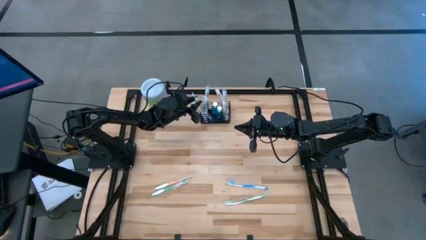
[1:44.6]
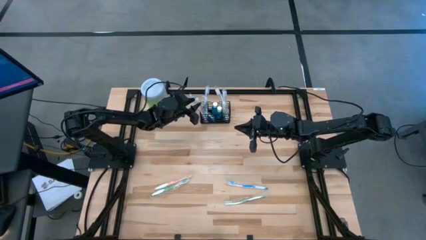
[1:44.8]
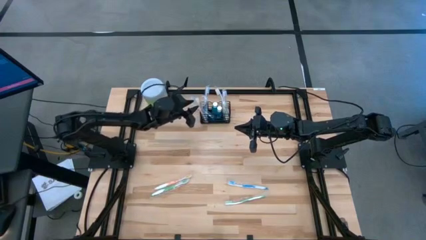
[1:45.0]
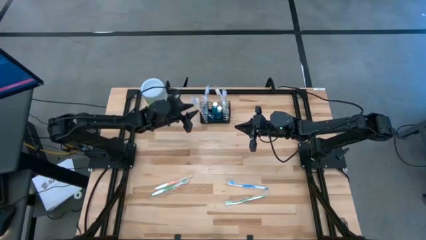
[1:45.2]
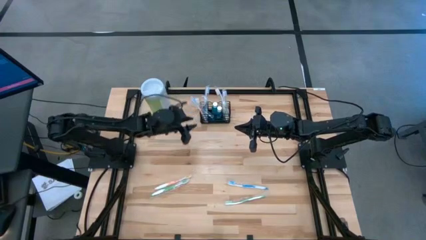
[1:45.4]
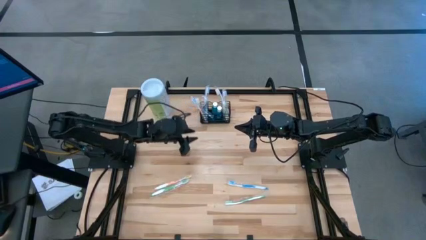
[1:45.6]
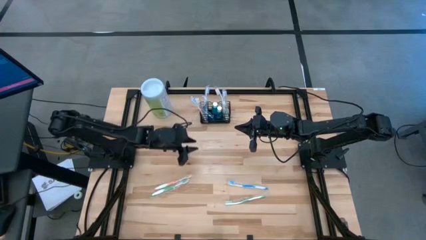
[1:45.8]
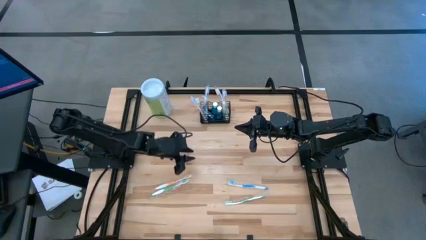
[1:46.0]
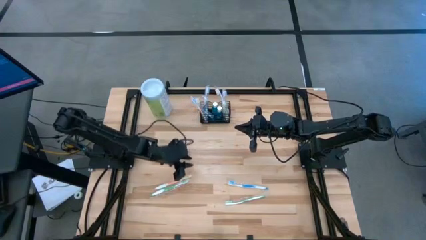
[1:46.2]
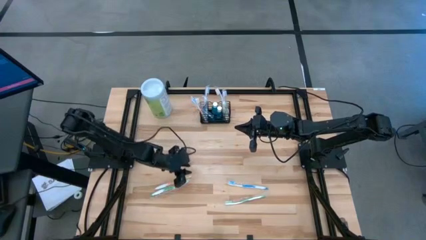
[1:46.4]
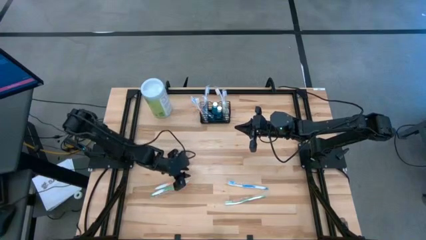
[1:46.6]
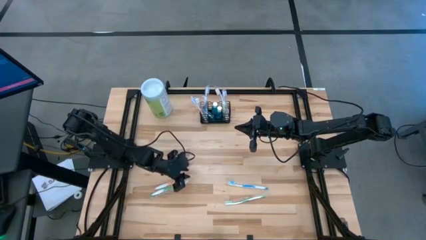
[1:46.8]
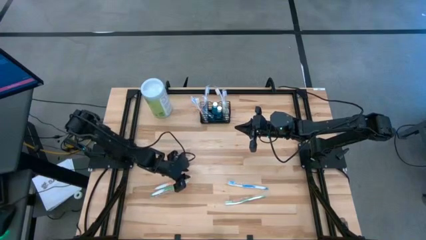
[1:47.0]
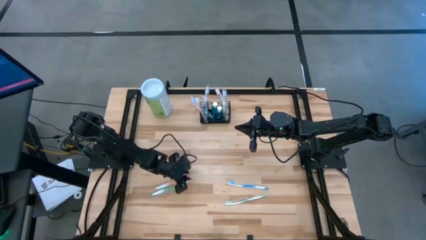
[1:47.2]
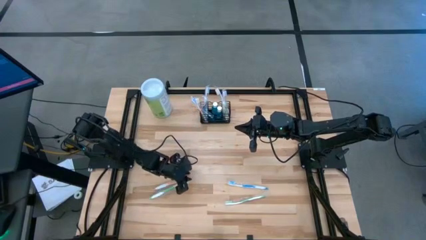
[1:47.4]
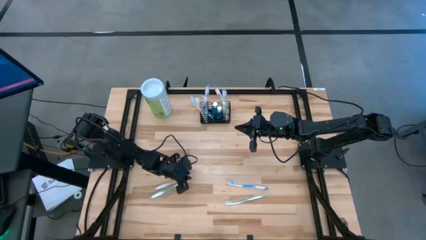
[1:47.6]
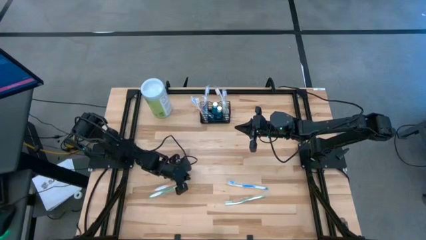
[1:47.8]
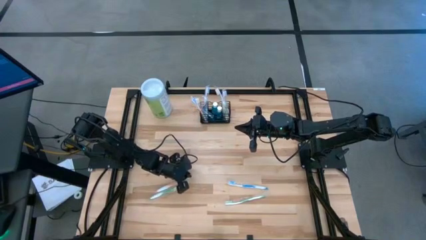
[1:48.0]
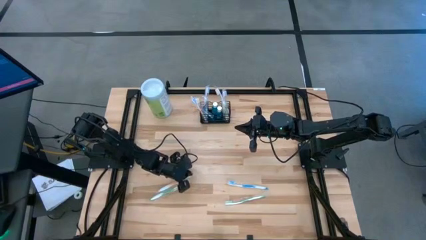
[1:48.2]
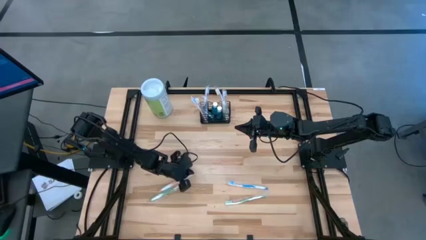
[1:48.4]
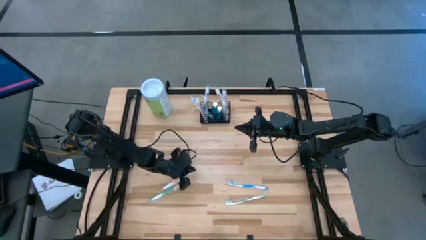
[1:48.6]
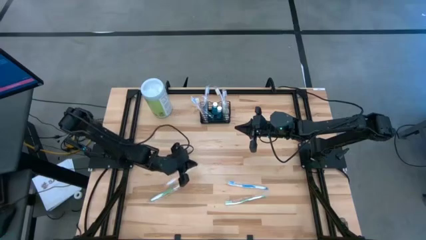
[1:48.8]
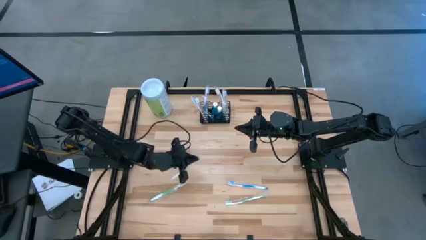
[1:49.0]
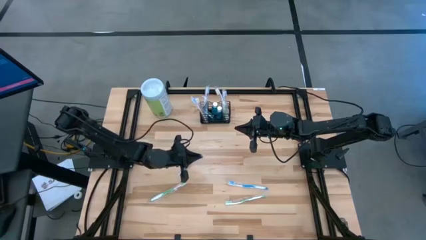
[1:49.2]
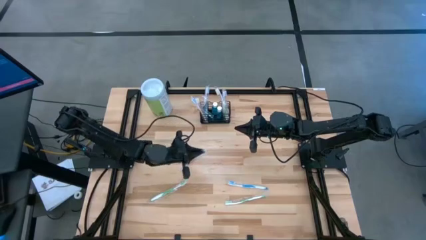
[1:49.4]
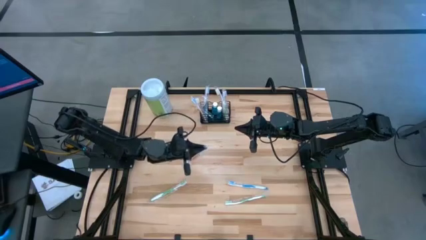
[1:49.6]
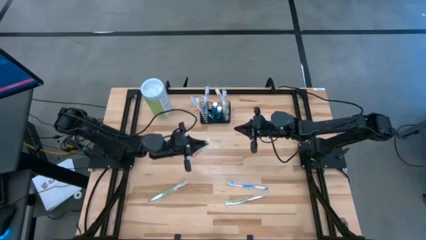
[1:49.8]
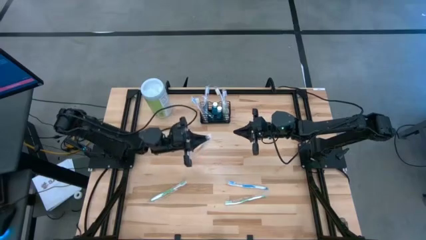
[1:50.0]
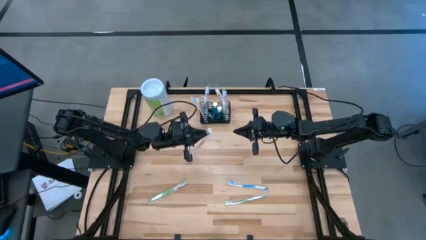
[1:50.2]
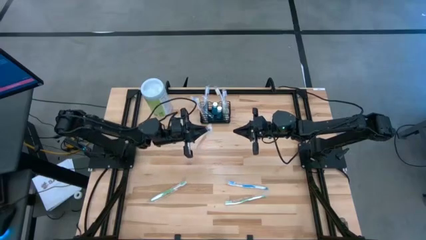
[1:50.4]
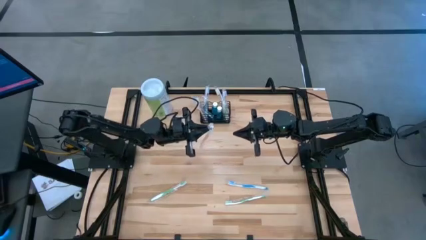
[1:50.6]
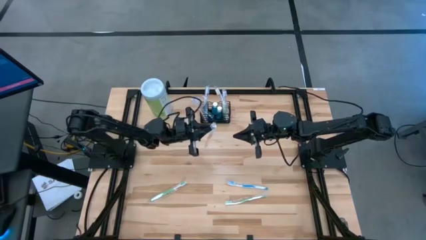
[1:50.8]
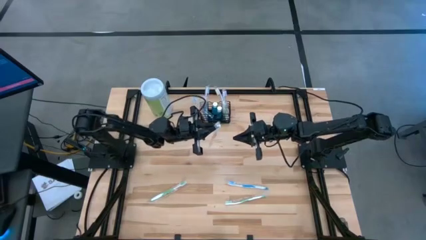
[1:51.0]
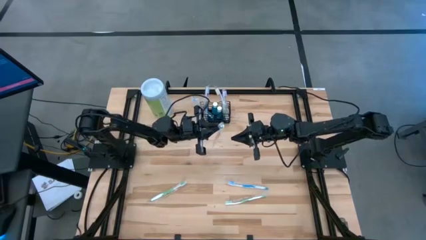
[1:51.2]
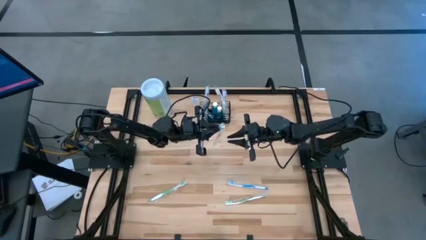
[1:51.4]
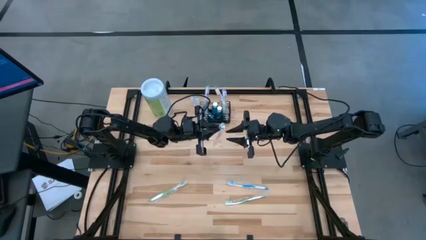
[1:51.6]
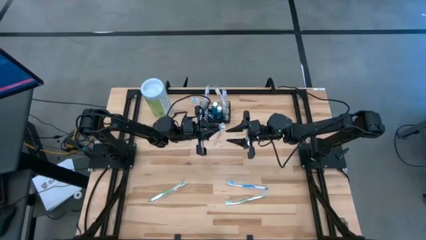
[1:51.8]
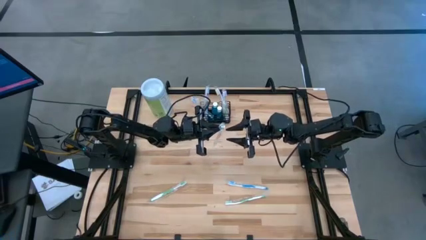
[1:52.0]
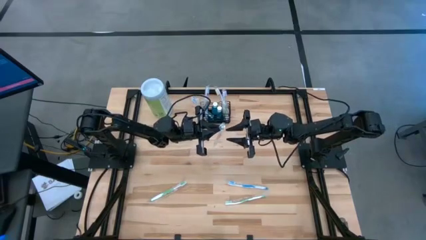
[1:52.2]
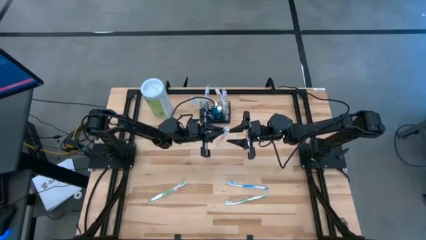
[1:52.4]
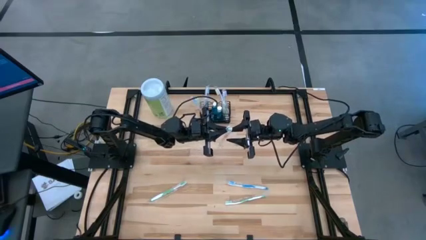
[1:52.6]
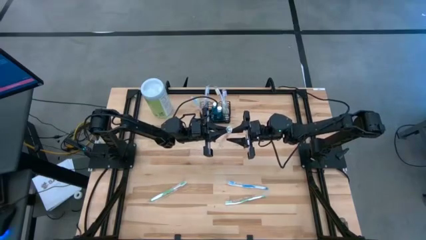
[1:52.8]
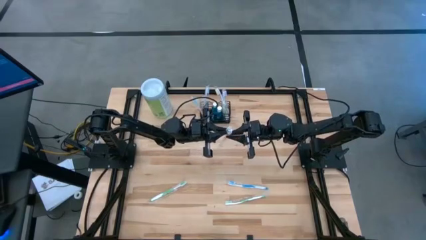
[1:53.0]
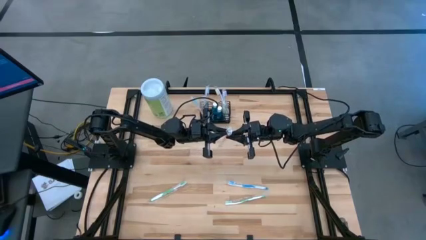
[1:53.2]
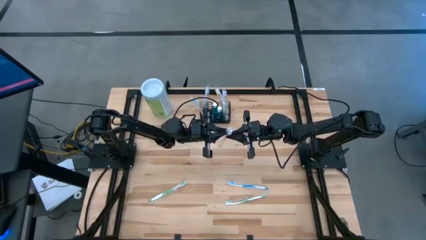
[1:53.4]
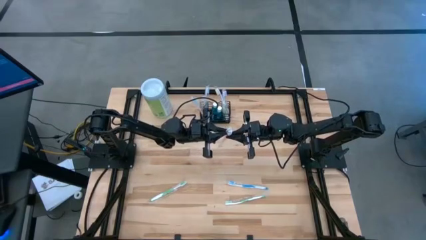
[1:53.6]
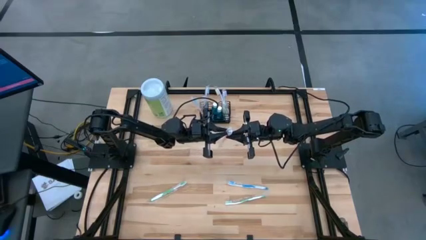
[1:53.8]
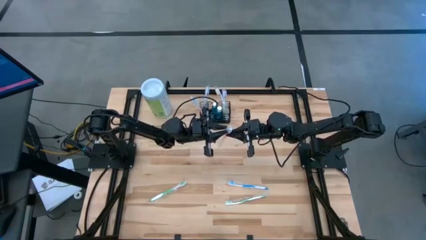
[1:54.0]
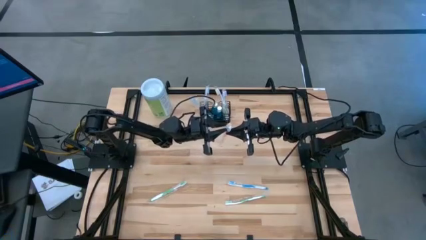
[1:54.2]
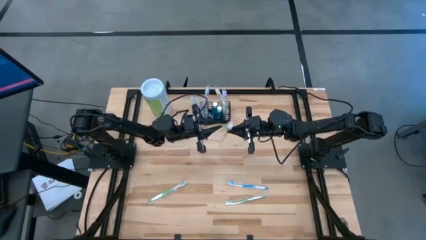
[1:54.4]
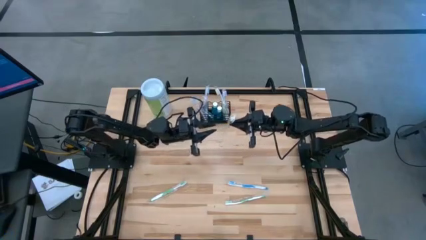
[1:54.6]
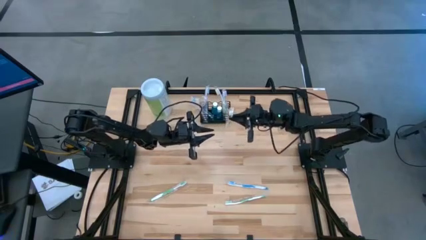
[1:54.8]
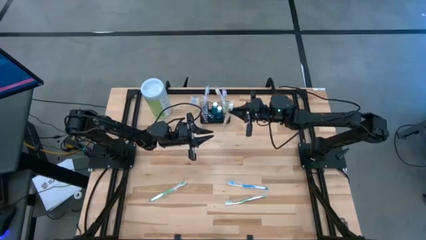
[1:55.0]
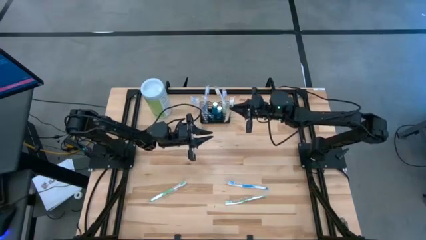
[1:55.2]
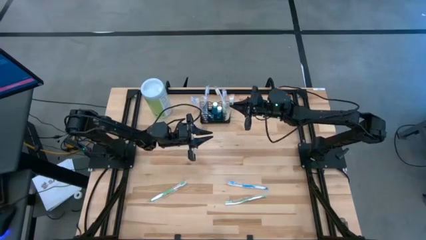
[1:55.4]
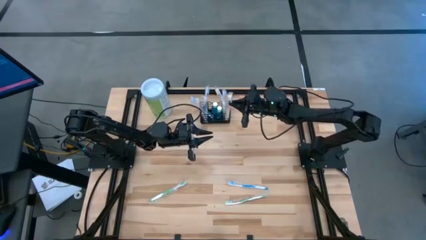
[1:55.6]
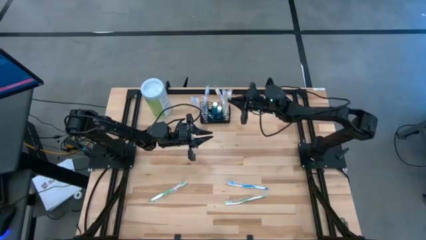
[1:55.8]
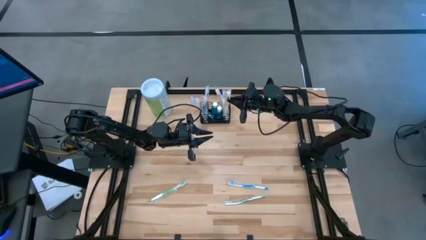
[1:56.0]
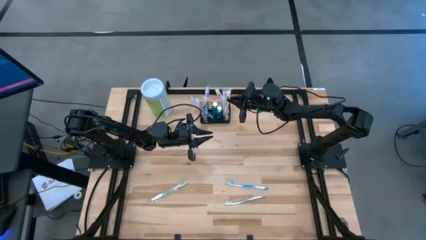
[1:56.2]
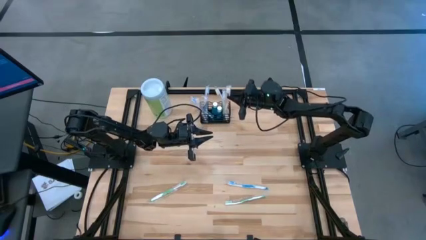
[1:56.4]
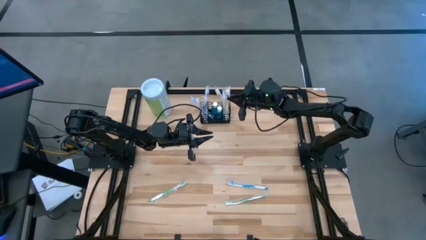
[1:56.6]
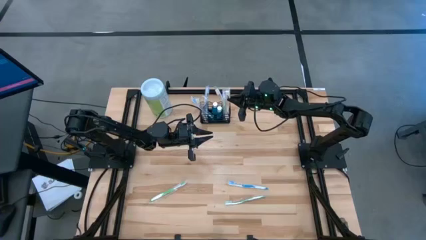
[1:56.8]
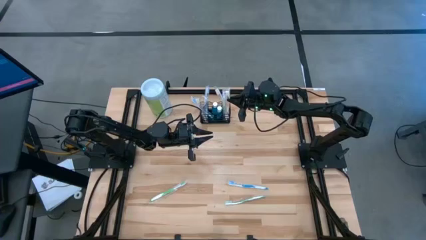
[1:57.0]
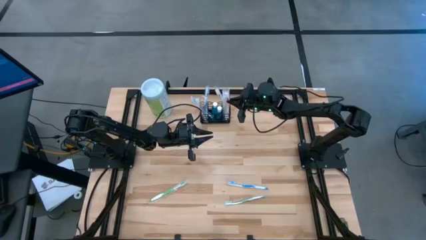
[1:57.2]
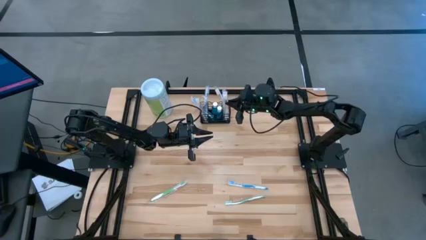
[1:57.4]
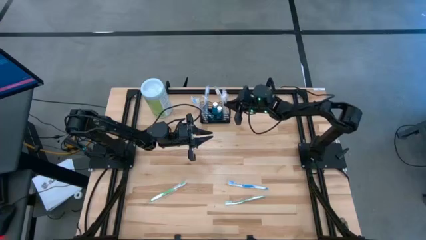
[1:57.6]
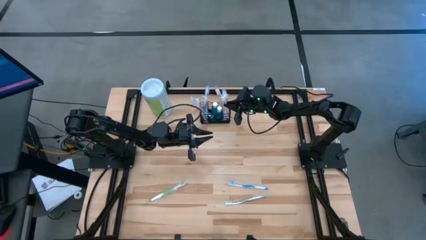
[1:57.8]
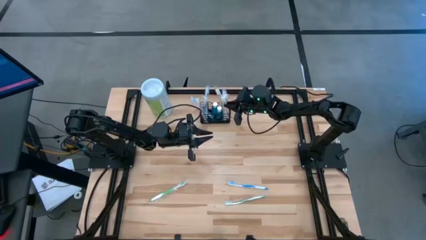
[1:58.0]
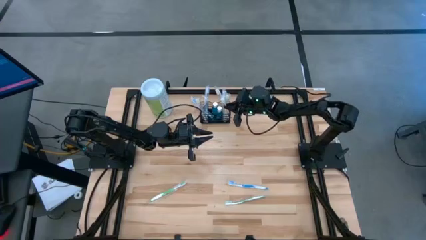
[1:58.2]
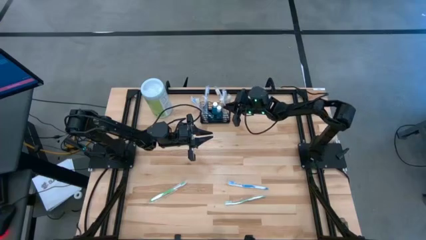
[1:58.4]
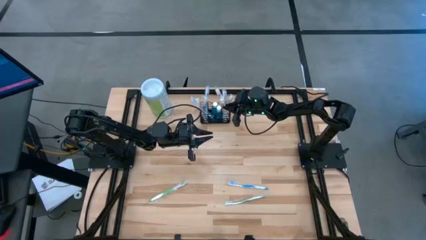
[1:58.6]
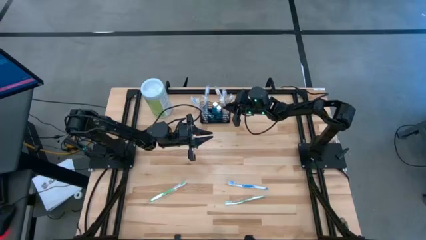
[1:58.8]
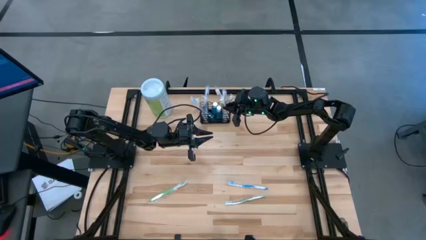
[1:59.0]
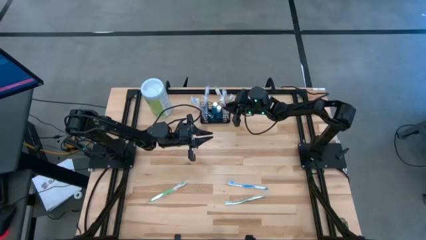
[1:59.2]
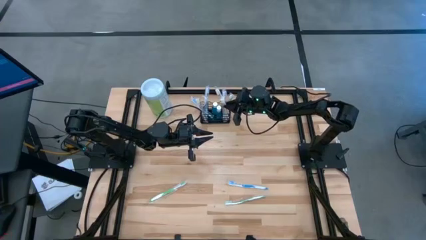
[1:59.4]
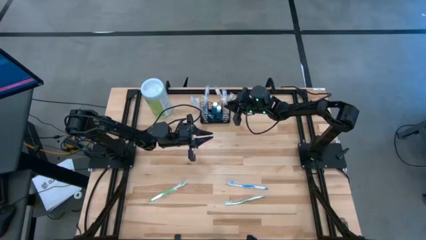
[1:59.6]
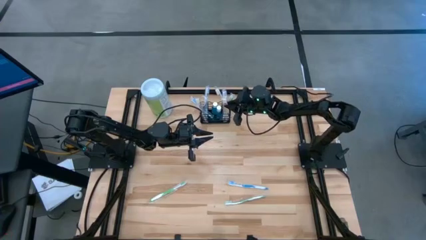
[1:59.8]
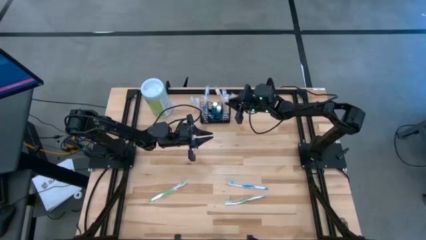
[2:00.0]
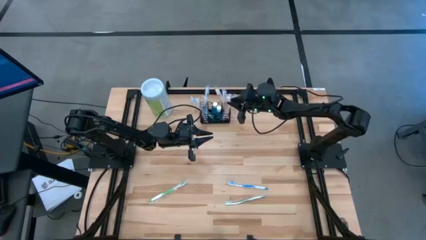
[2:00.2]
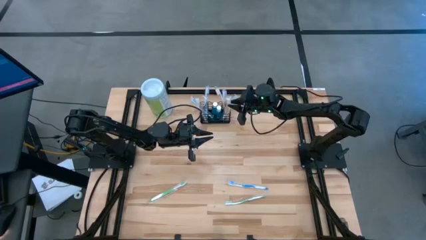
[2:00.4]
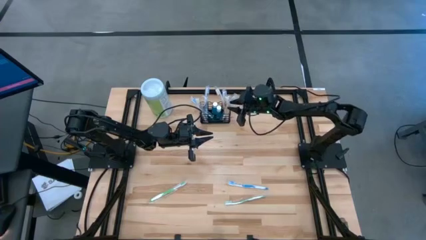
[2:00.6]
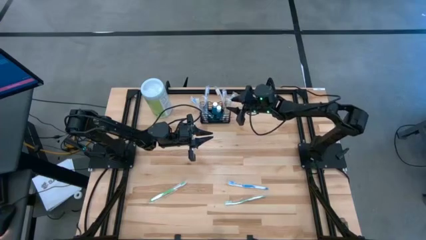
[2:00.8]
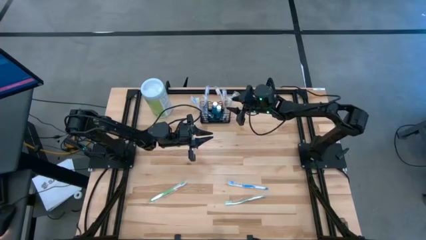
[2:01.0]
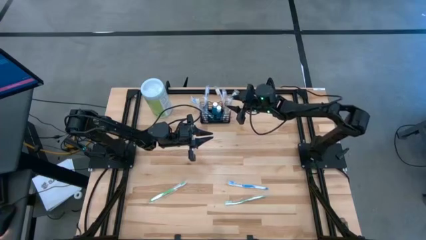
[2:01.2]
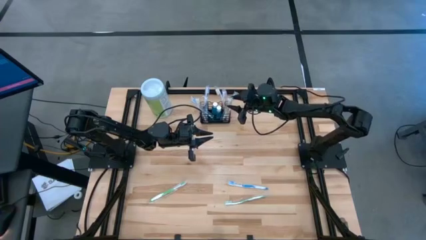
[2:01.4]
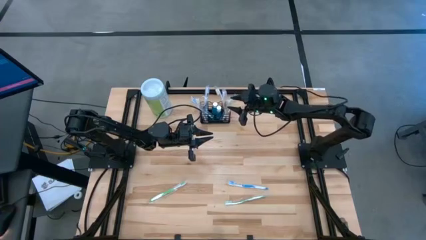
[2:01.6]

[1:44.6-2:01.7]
Task: Pick & Place toothbrushing station
Put the orange toothbrush into the black wire organizer
